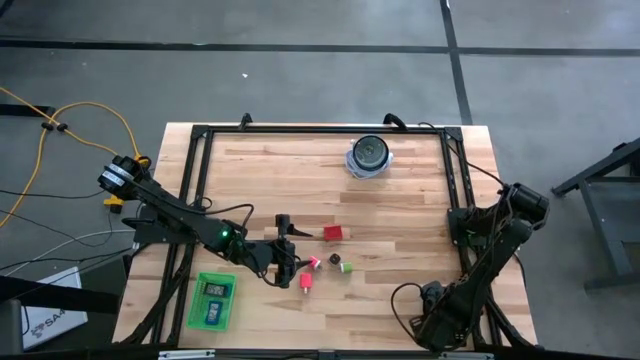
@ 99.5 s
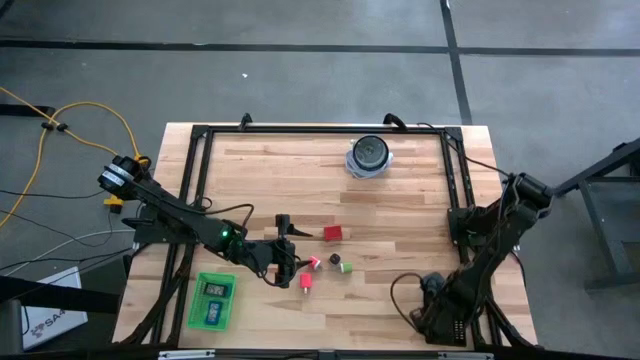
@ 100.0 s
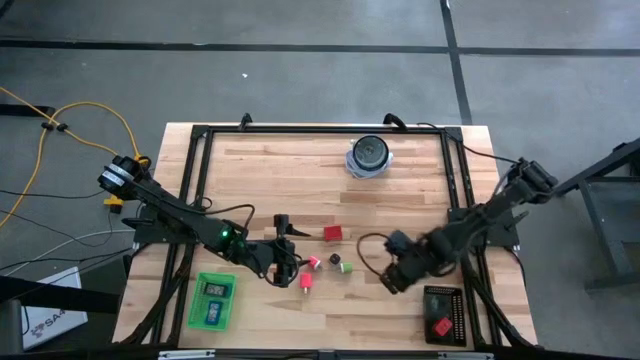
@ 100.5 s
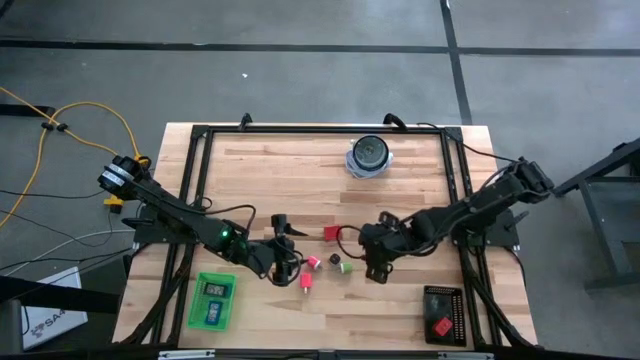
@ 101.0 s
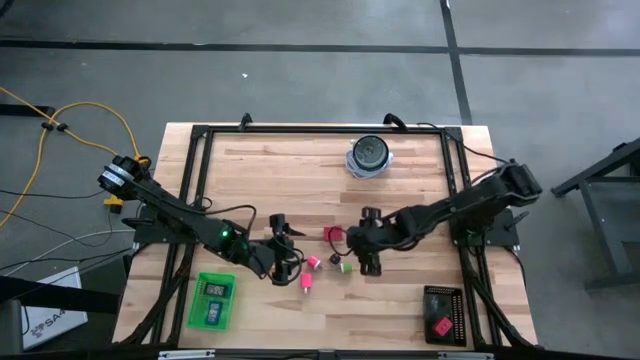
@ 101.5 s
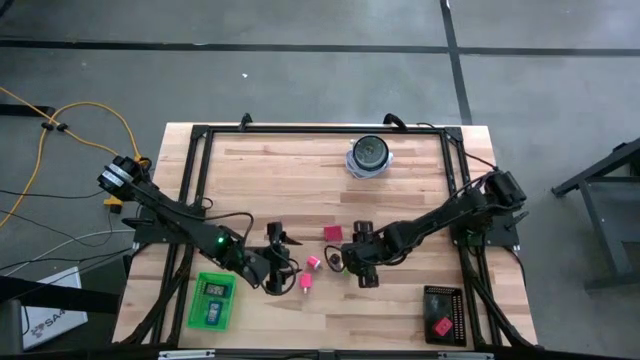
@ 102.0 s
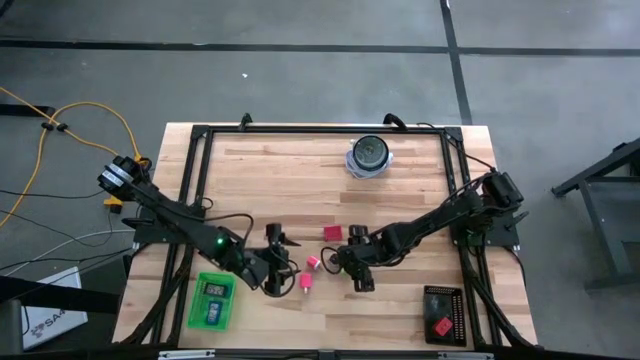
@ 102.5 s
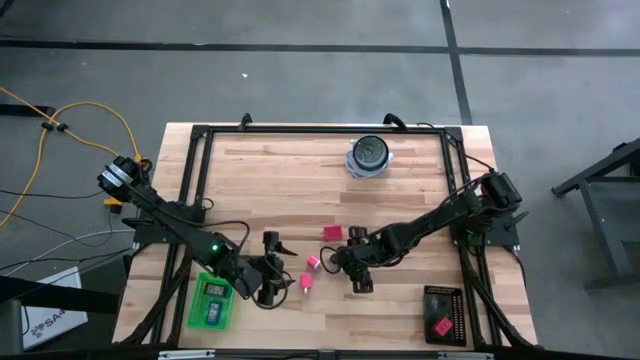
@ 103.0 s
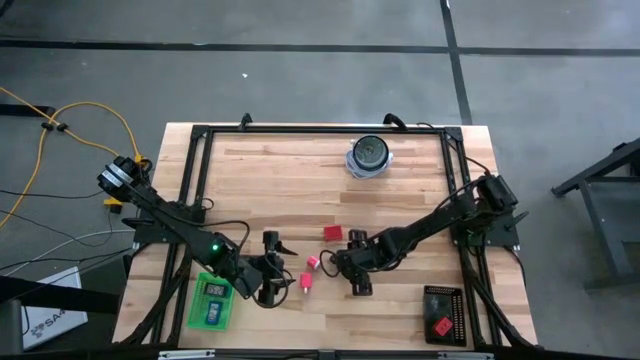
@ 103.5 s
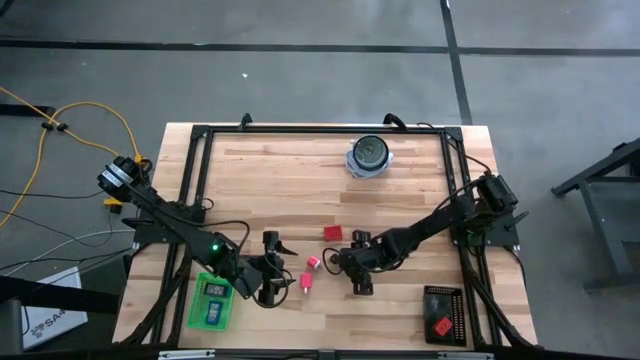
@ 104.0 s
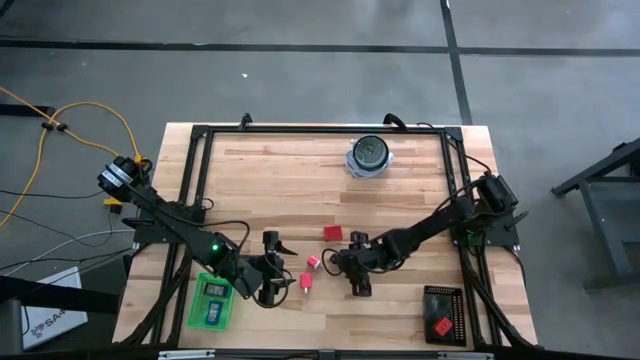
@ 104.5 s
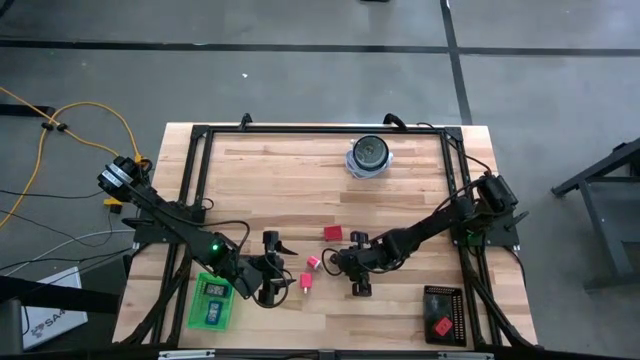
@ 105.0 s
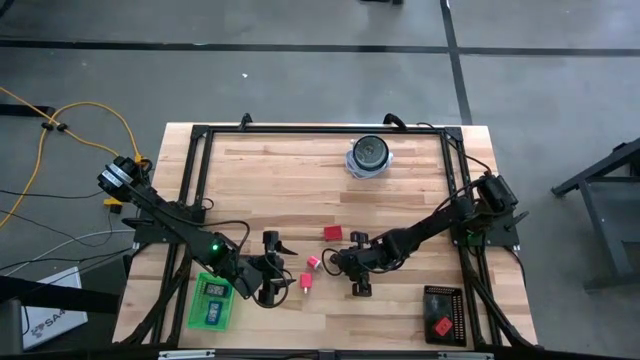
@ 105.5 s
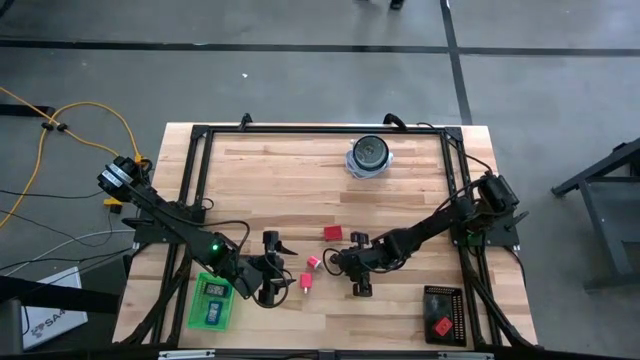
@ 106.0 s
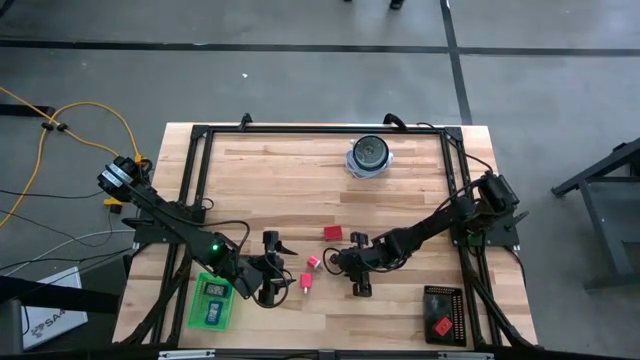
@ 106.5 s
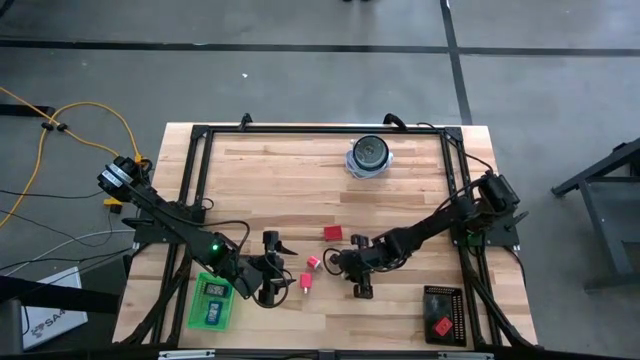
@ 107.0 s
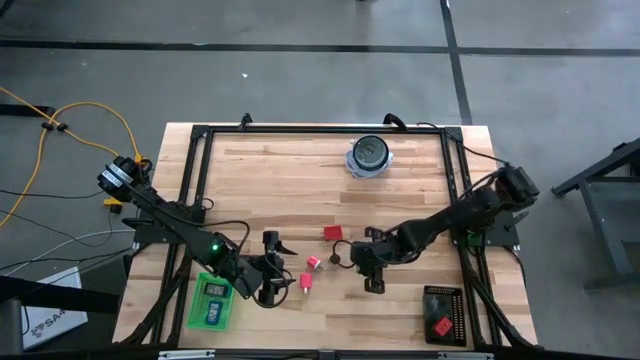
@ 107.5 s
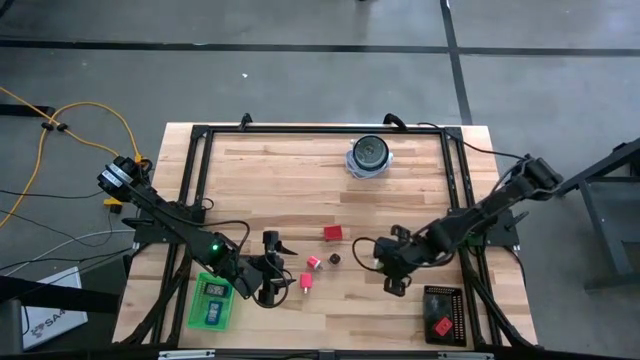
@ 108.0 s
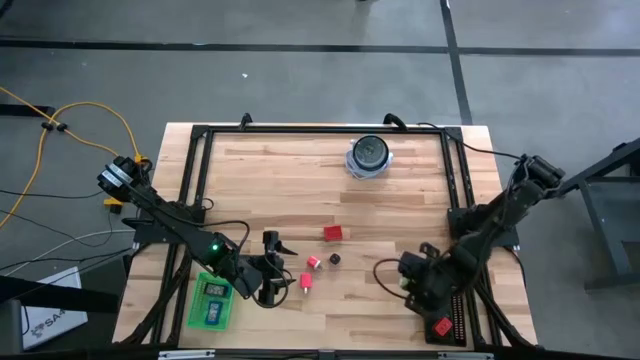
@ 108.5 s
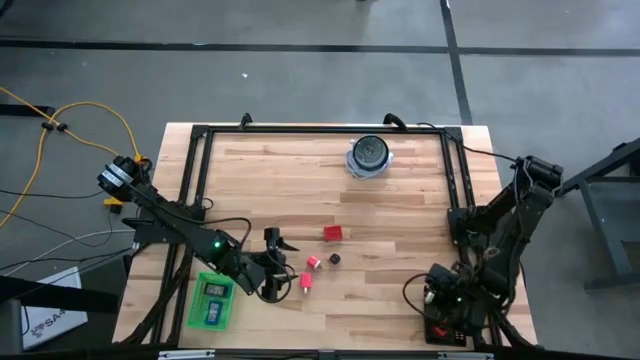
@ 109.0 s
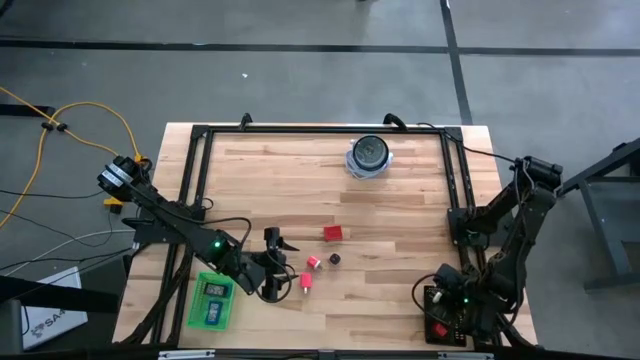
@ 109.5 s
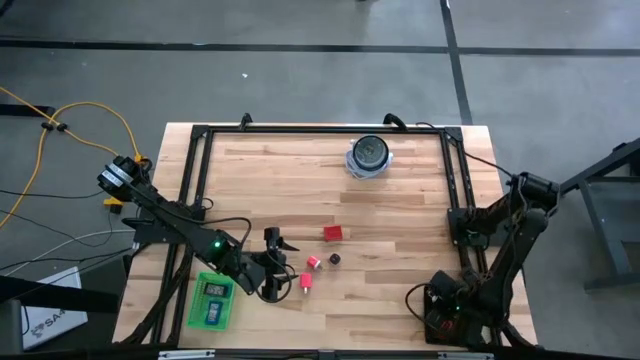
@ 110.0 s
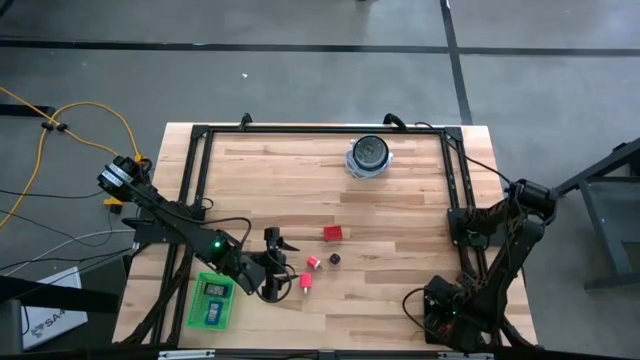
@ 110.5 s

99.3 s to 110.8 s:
Task: Pick & Place Office items
Put the green charger adapter into the black bin

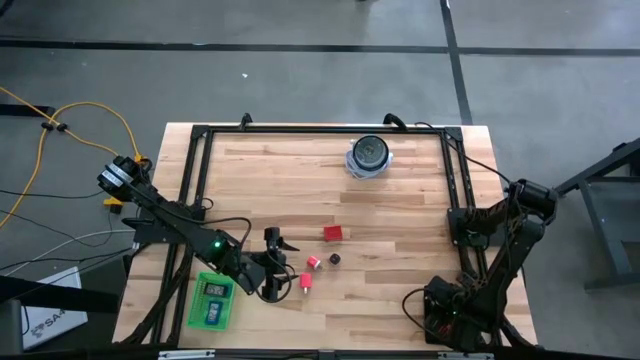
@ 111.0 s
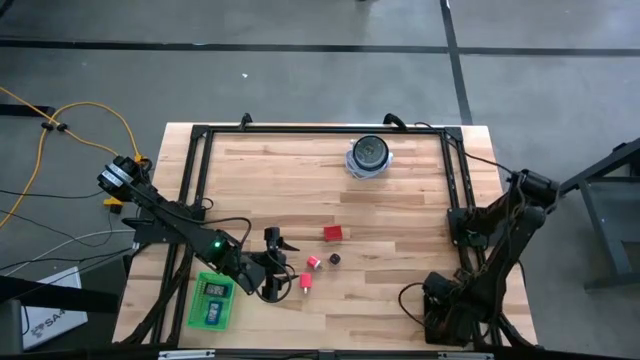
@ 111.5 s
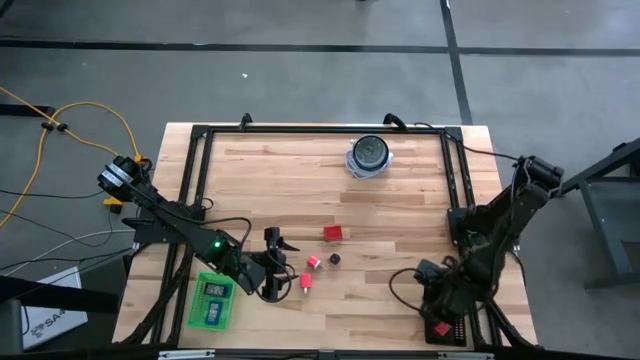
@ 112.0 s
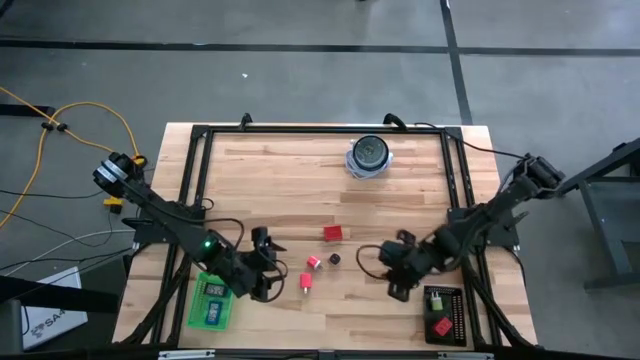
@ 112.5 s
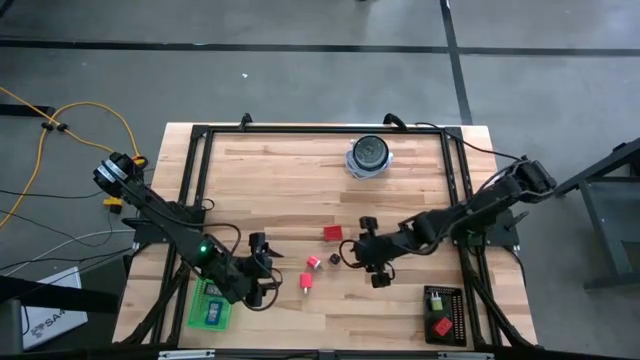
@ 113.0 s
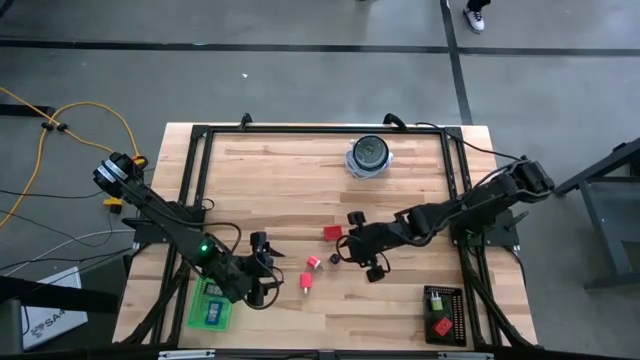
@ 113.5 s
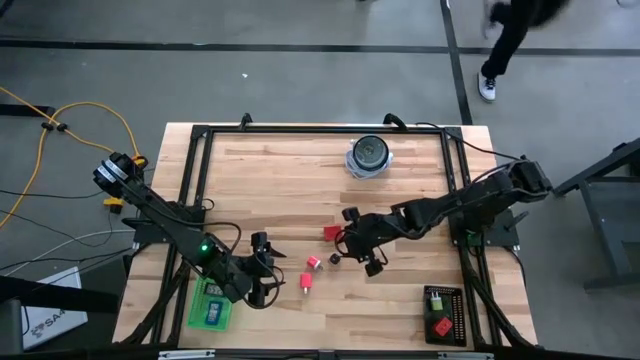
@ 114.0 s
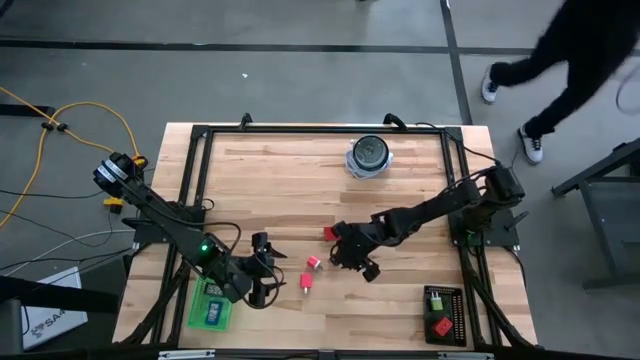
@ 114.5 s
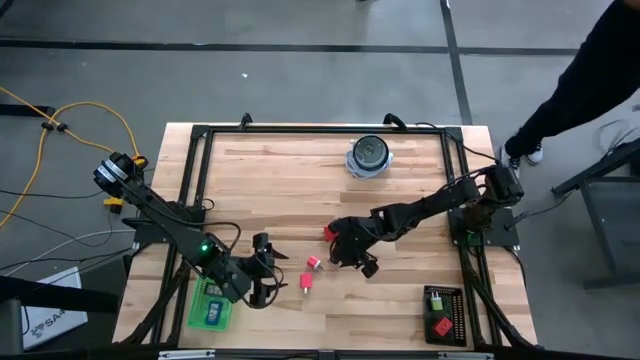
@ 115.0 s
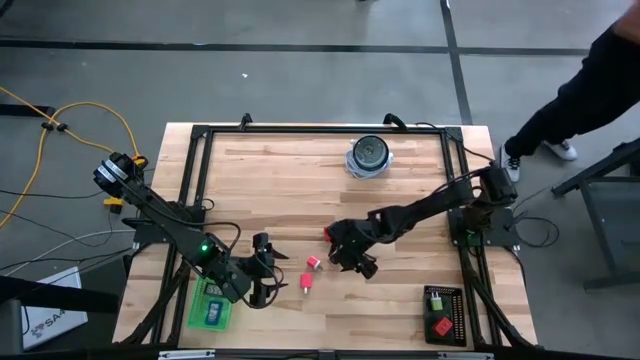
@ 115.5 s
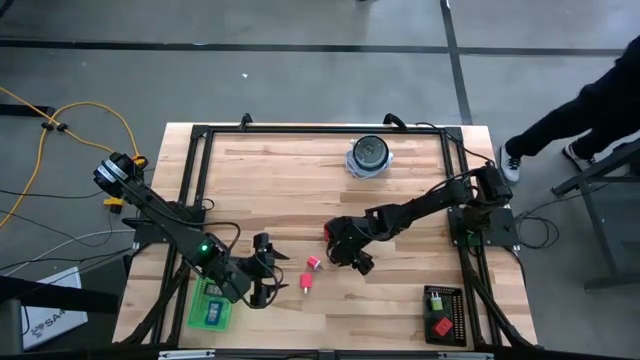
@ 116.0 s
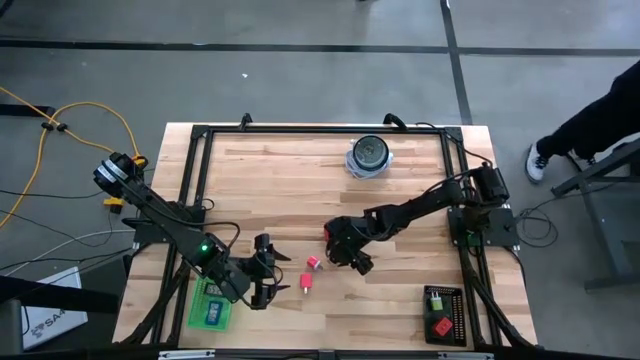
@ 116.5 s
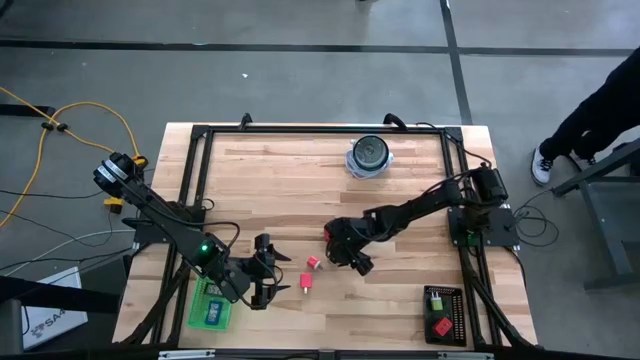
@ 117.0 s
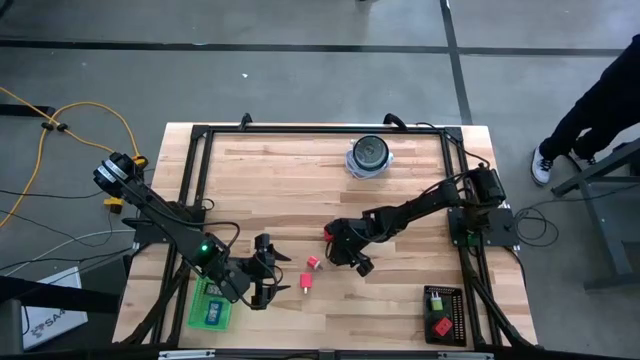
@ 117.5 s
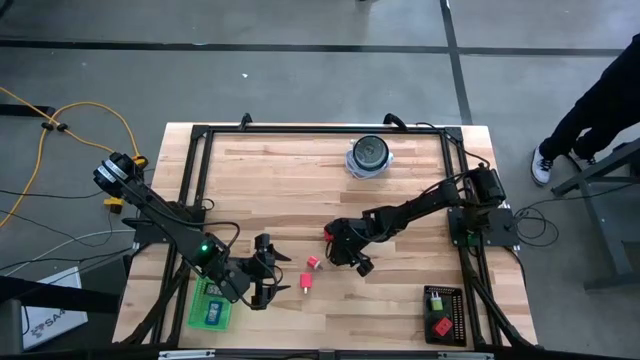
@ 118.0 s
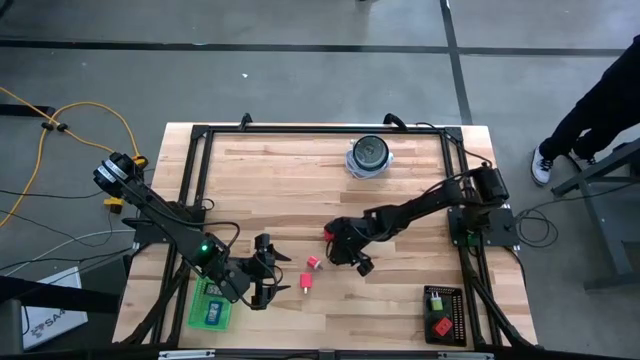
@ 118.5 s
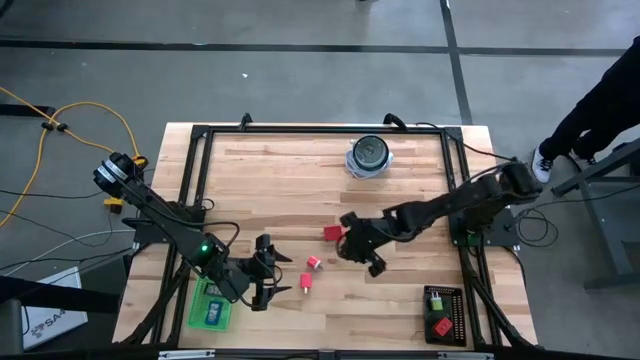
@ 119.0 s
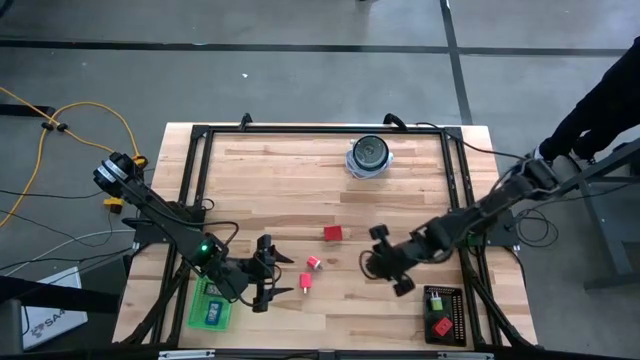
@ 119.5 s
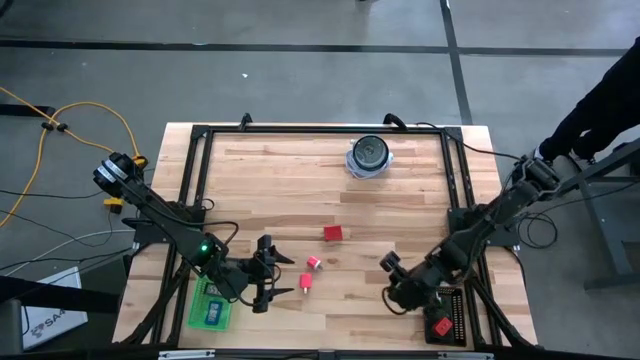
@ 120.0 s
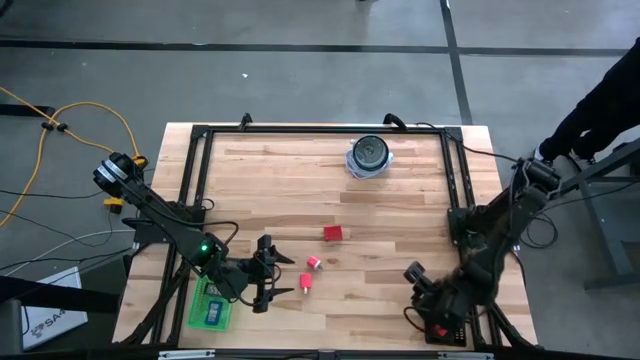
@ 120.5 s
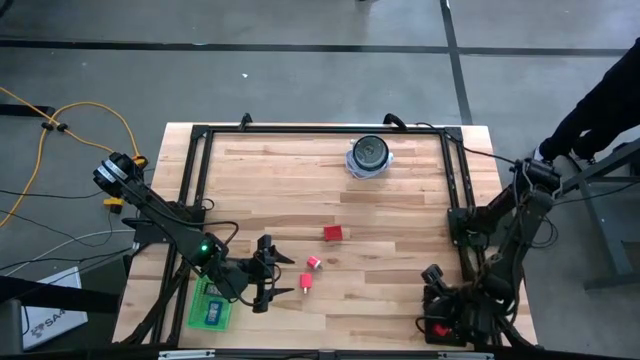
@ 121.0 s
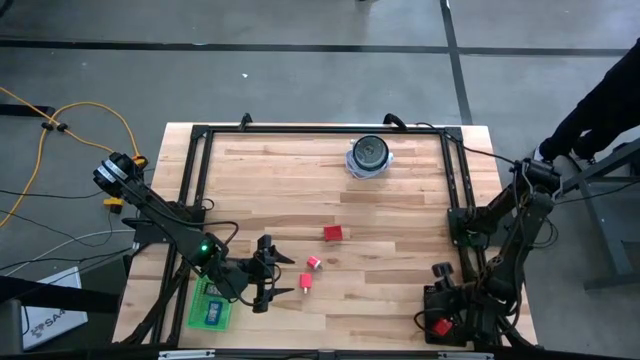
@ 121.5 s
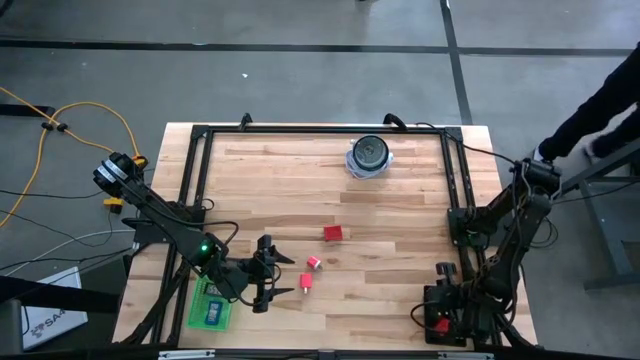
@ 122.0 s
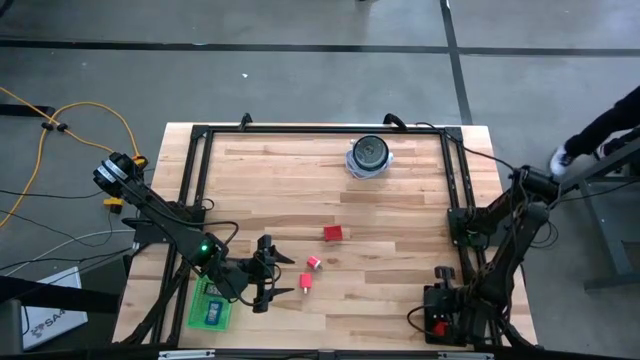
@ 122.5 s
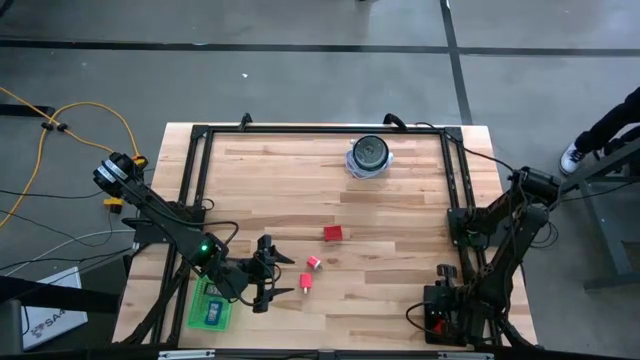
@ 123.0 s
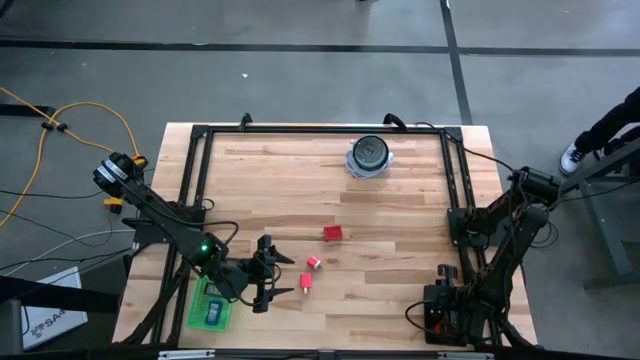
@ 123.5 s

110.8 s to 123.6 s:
Put the white charger adapter into the black bin
